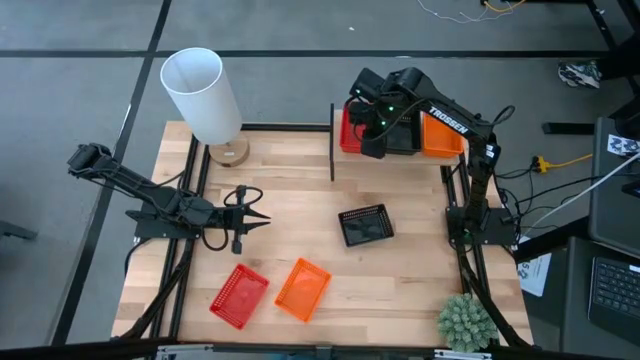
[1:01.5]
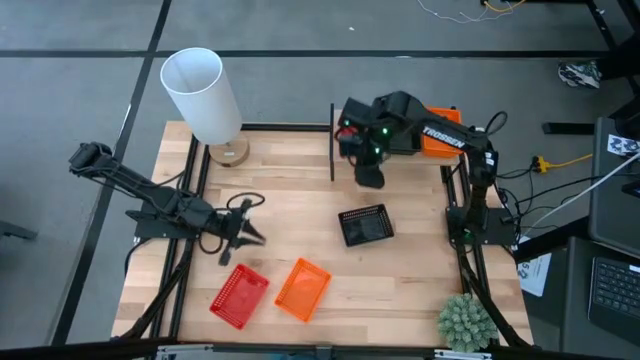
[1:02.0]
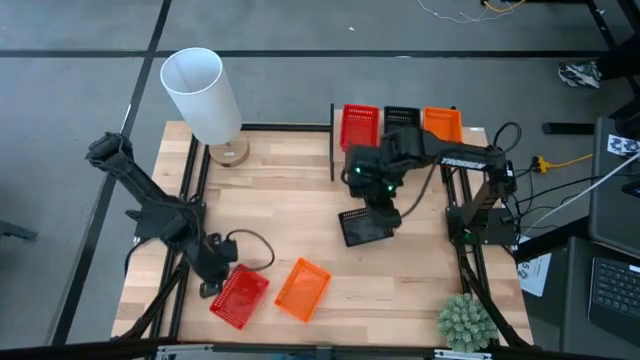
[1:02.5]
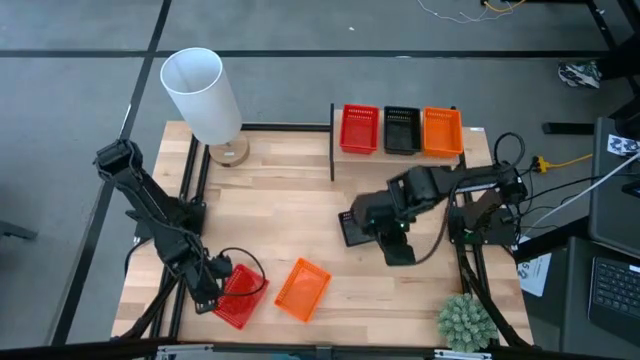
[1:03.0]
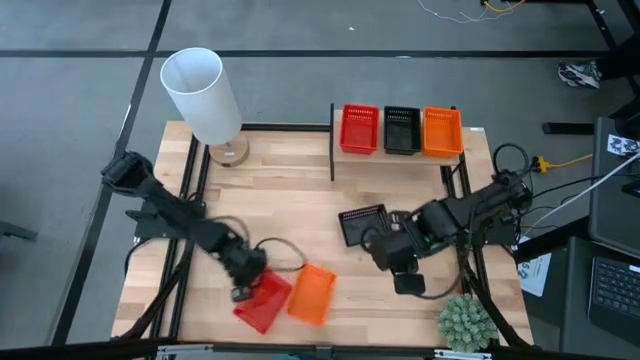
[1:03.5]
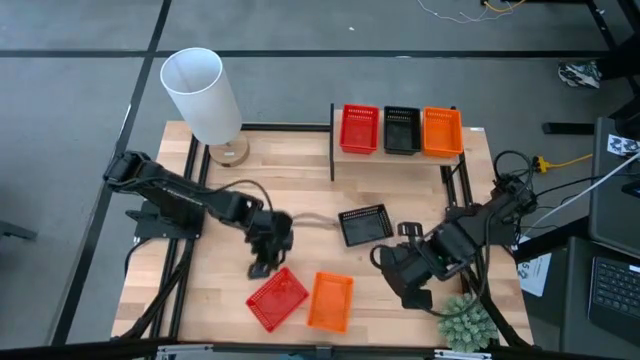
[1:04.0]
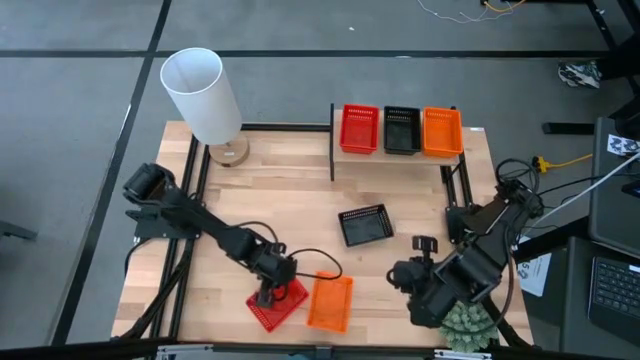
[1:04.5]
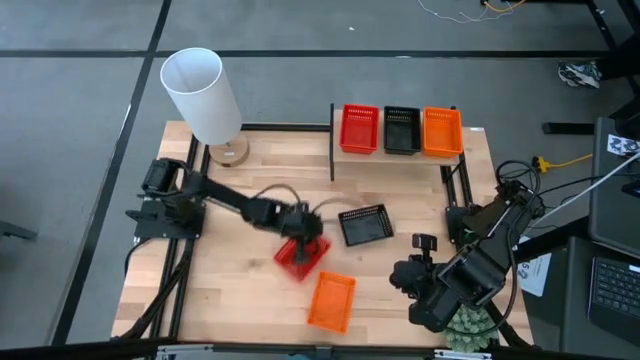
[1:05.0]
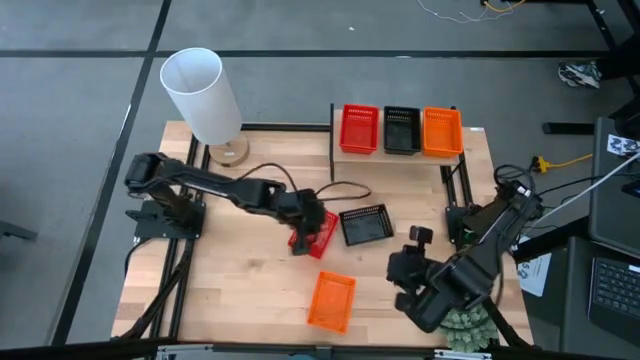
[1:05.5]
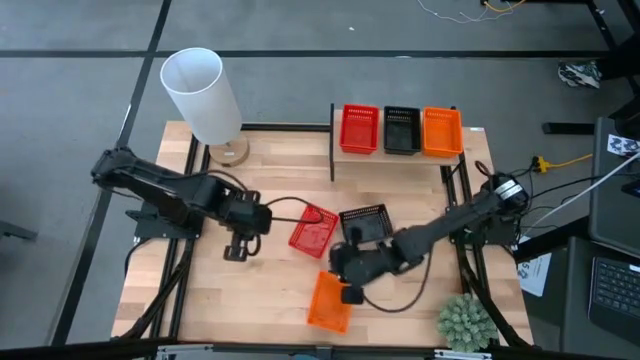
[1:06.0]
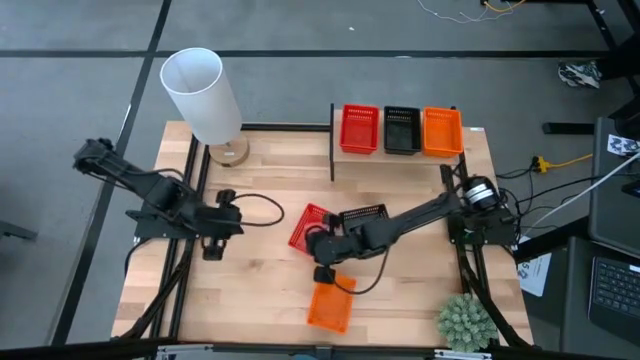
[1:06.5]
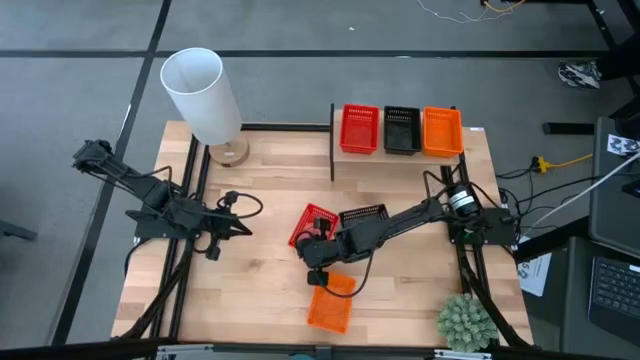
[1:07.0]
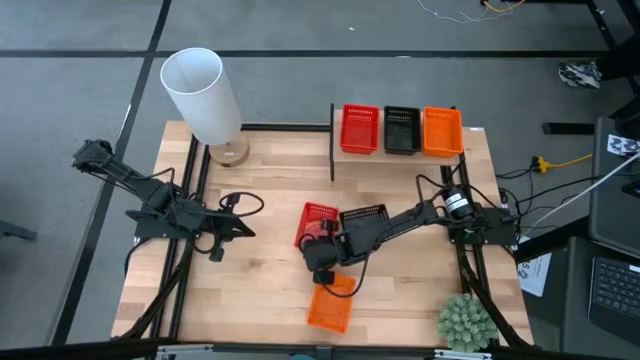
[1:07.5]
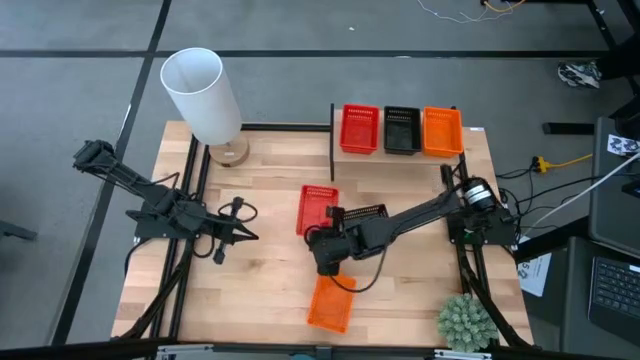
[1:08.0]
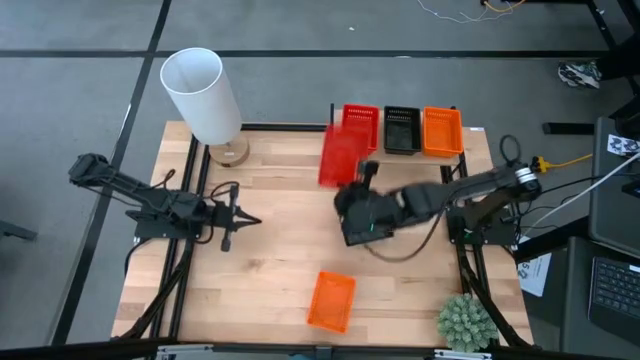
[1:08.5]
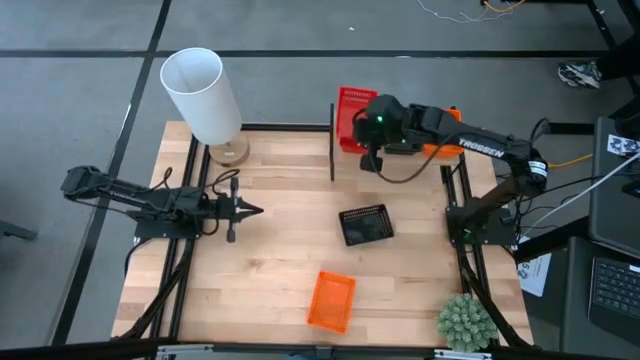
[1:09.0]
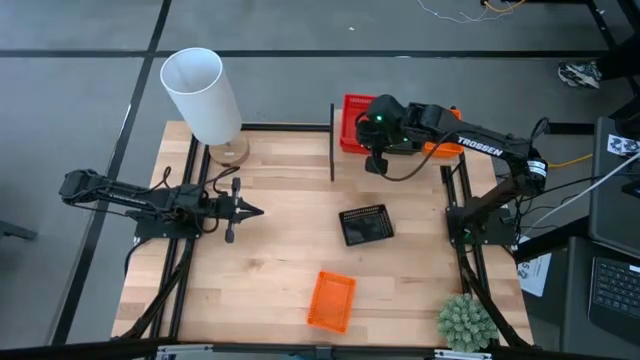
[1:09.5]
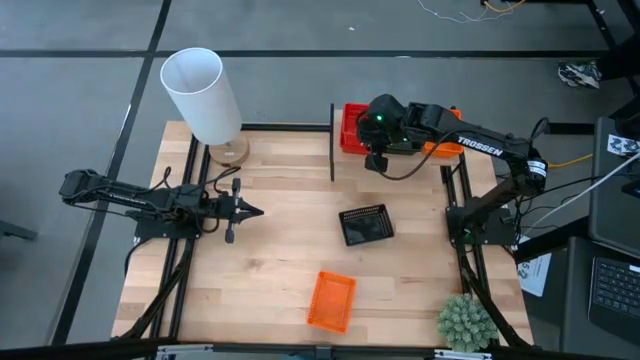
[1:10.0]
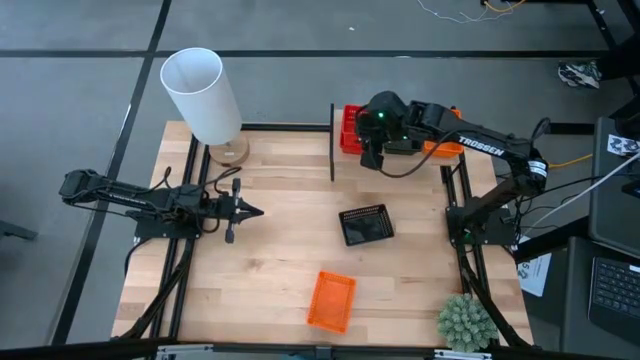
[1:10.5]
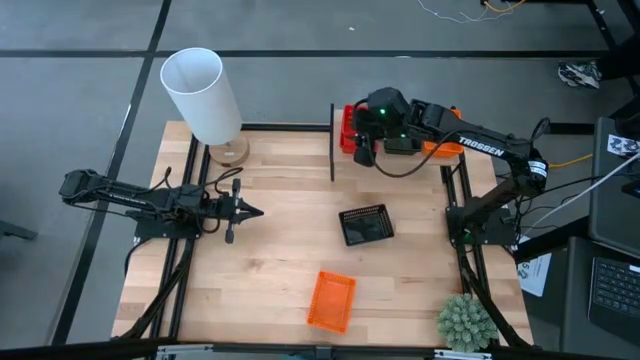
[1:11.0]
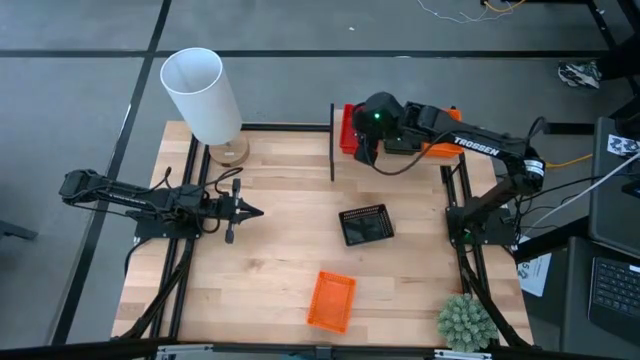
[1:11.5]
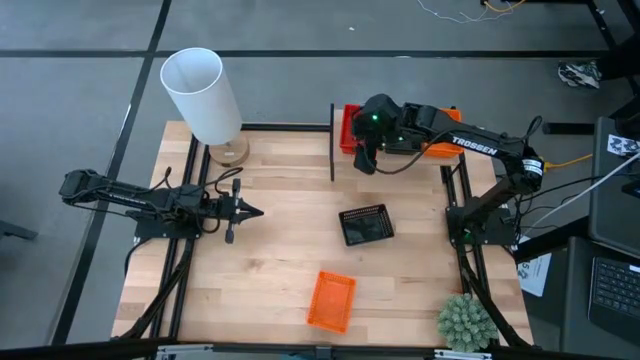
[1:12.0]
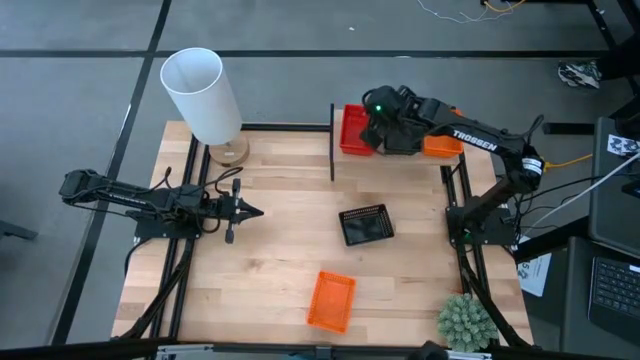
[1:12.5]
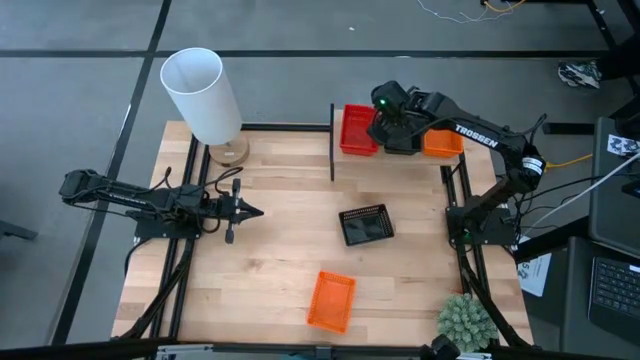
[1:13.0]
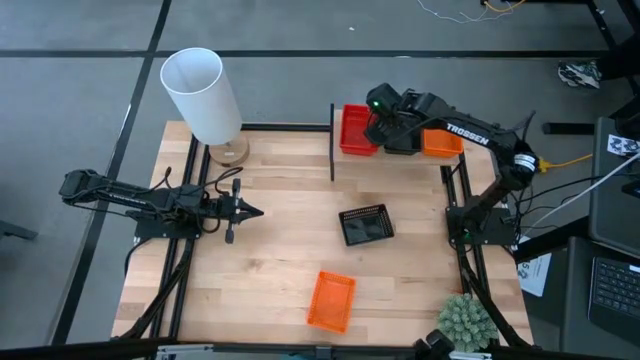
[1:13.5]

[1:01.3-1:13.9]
Task: Stack baskets on shelf by color
Stack the red basket on top of the red basket on the shelf

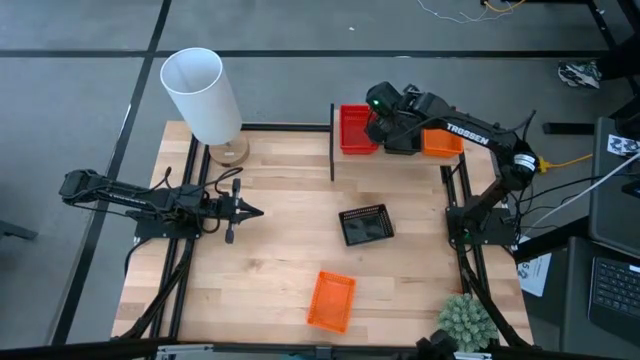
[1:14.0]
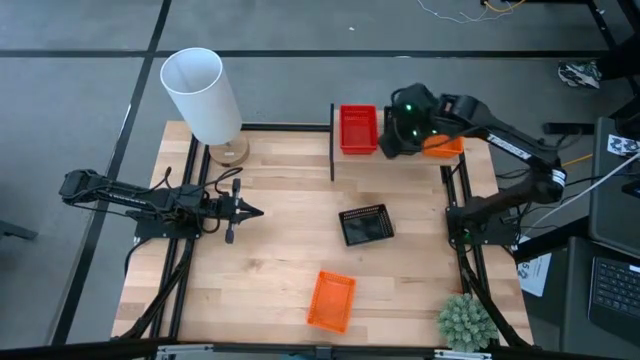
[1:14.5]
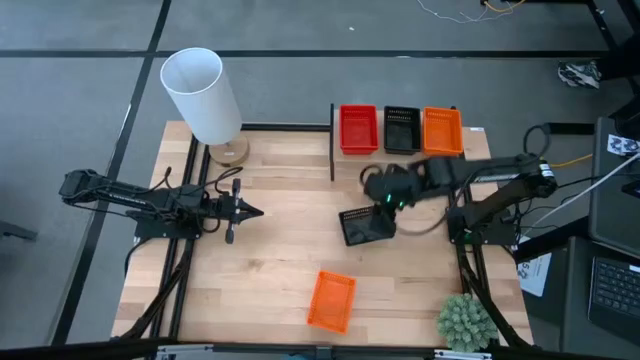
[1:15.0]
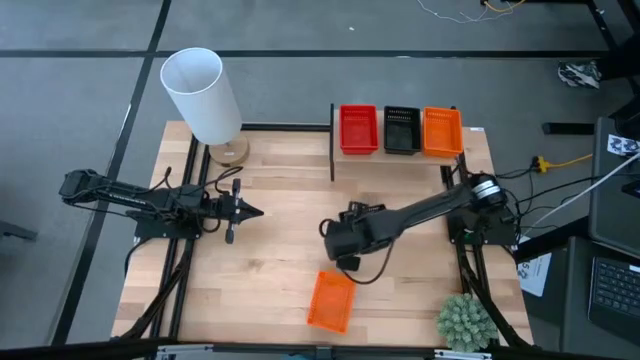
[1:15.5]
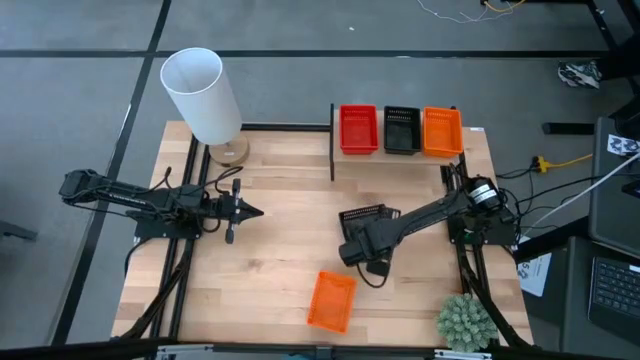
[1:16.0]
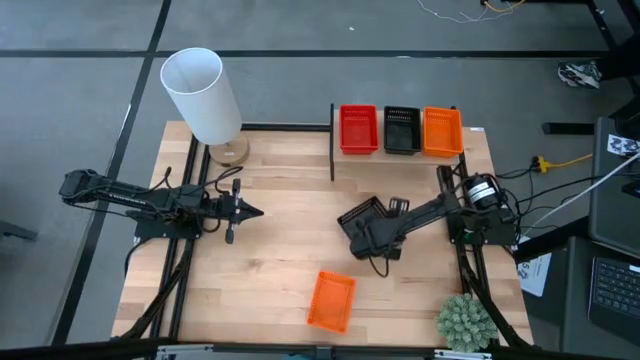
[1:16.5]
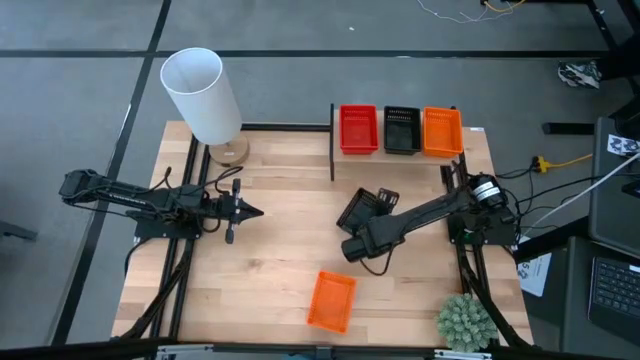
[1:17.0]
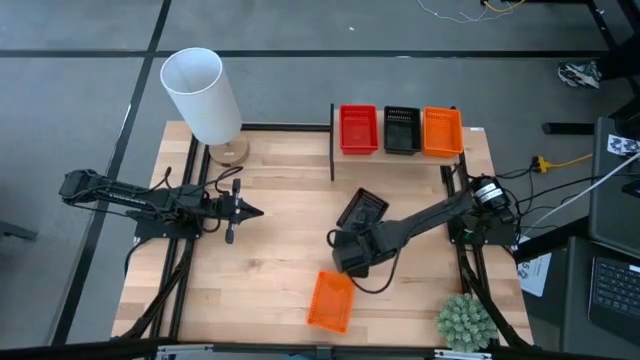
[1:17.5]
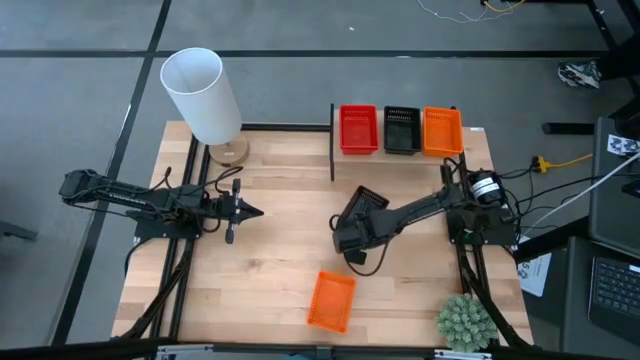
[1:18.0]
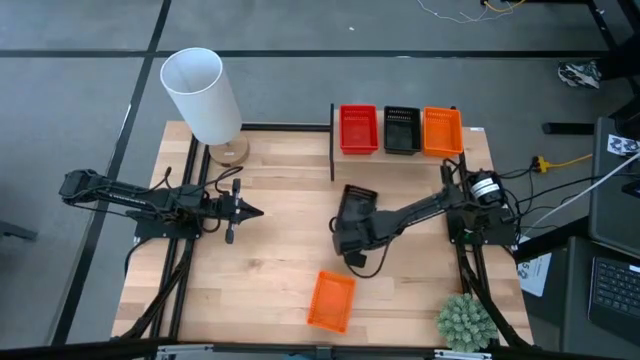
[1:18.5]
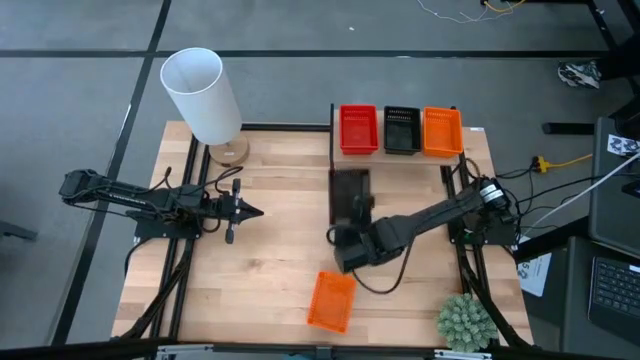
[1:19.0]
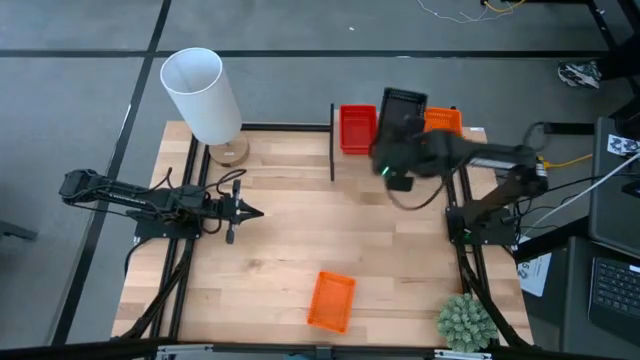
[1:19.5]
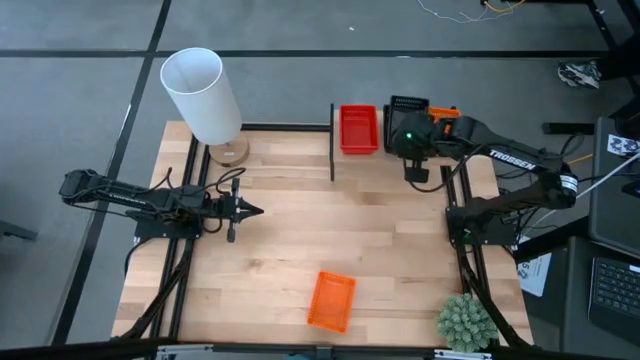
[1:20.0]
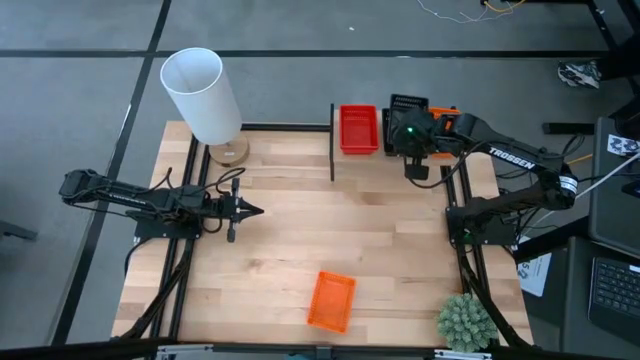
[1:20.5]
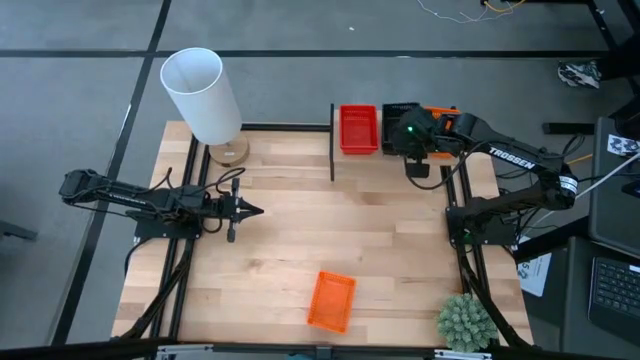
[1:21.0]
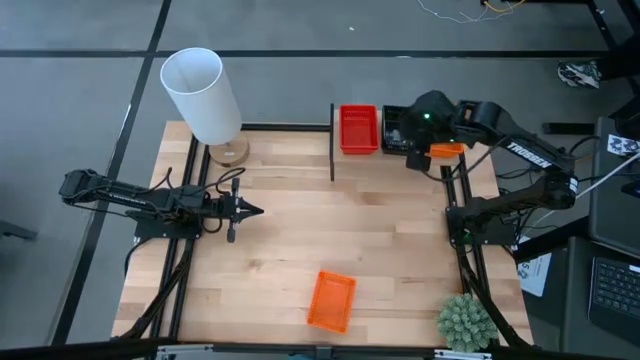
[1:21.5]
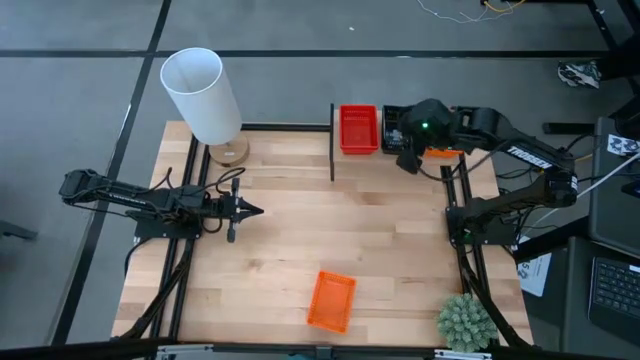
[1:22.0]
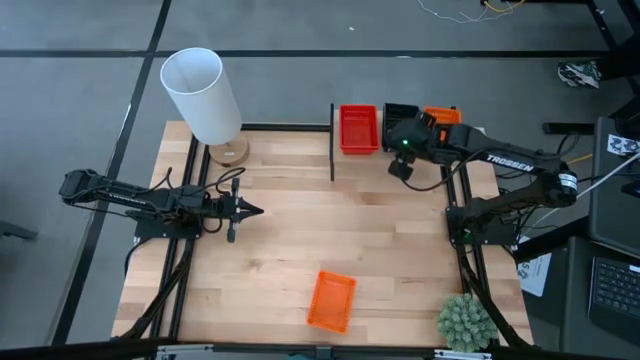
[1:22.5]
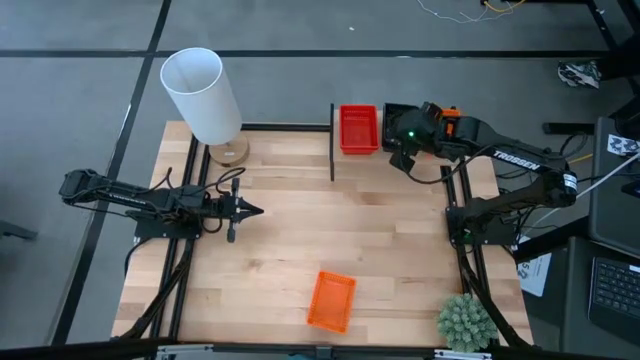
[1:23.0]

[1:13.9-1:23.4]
Stack the black basket on top of the black basket on the shelf
